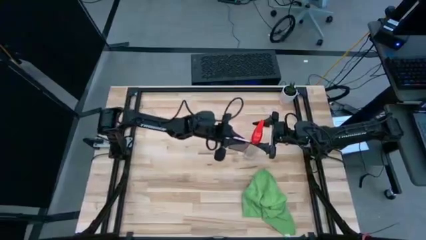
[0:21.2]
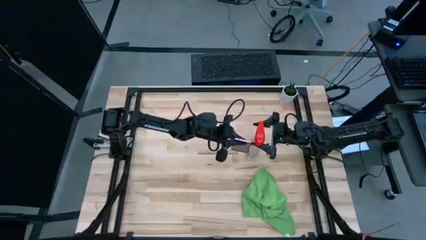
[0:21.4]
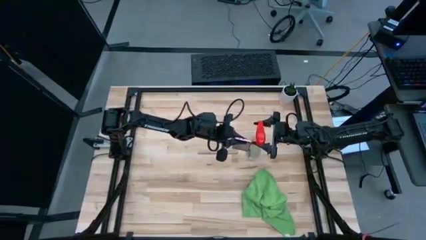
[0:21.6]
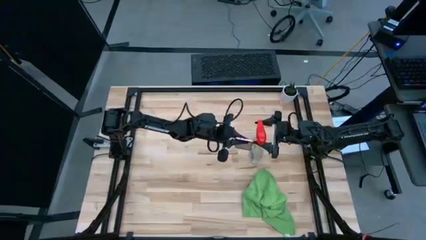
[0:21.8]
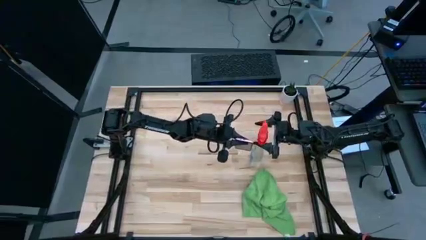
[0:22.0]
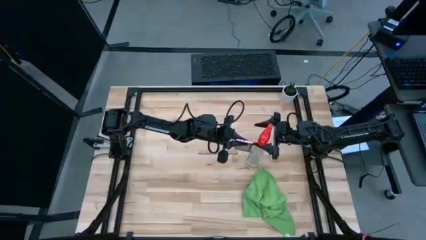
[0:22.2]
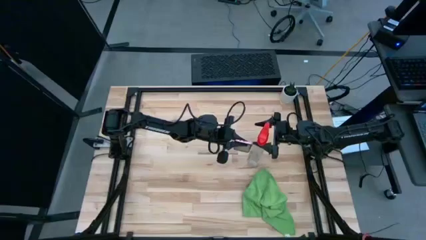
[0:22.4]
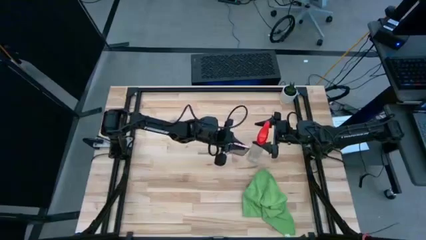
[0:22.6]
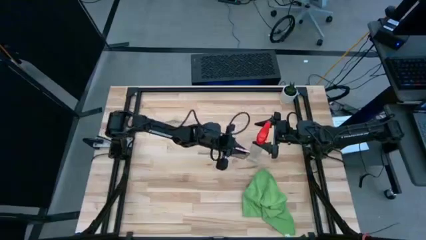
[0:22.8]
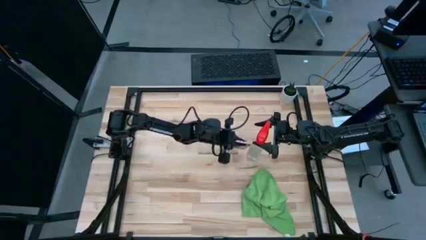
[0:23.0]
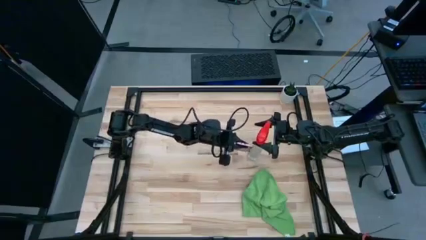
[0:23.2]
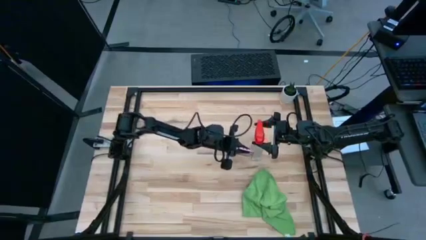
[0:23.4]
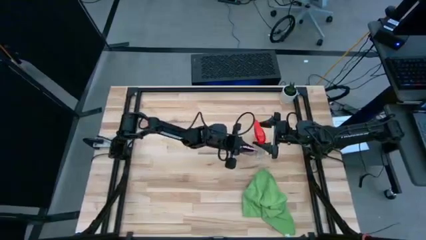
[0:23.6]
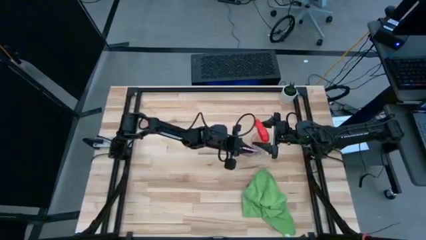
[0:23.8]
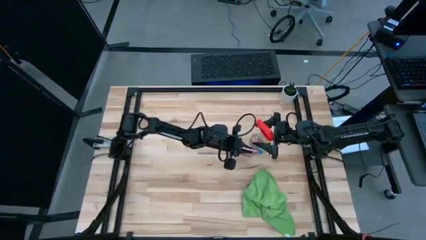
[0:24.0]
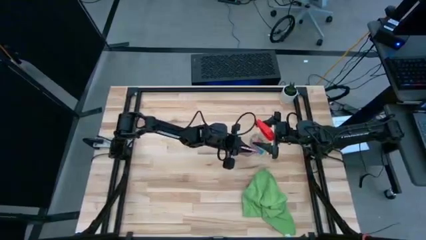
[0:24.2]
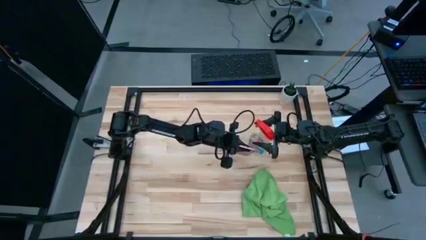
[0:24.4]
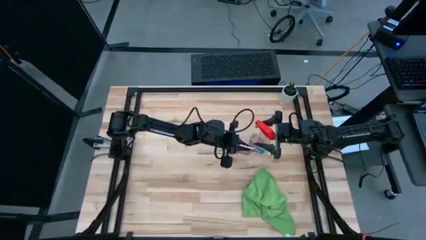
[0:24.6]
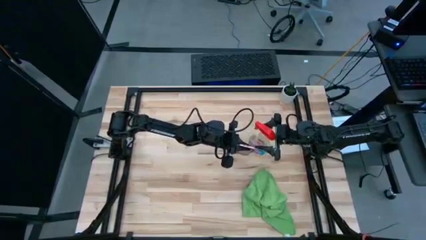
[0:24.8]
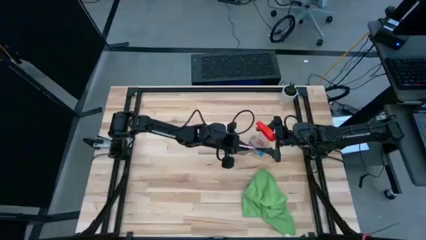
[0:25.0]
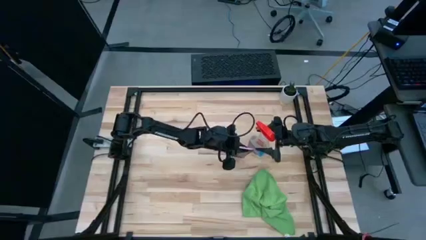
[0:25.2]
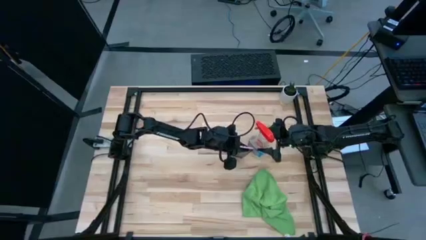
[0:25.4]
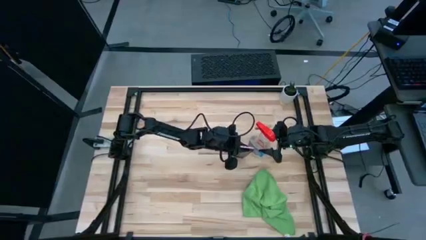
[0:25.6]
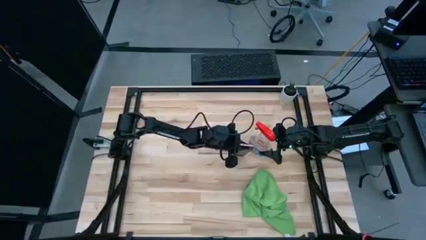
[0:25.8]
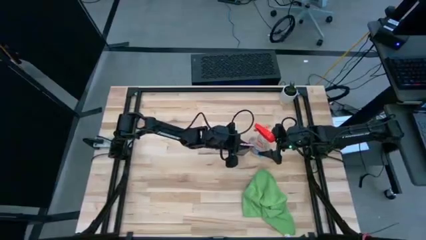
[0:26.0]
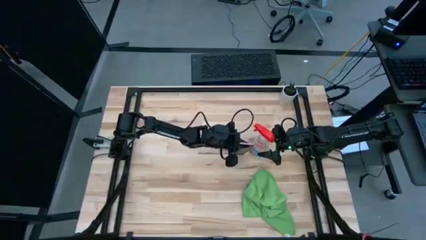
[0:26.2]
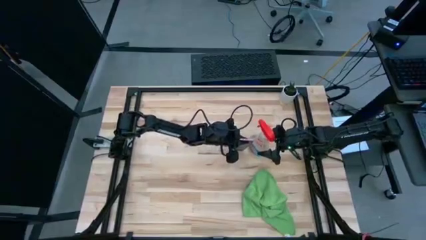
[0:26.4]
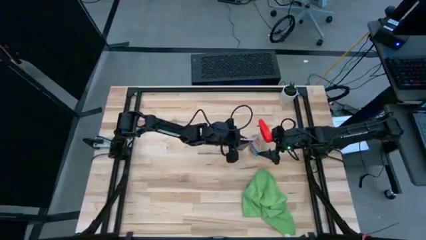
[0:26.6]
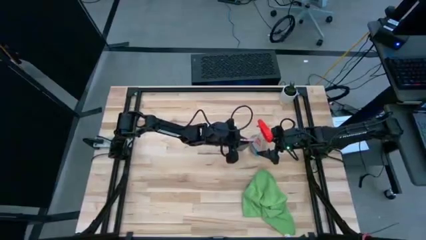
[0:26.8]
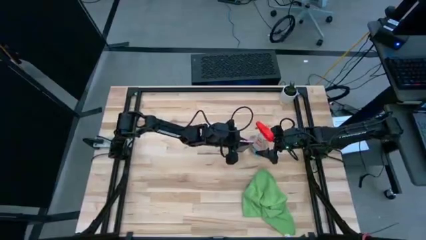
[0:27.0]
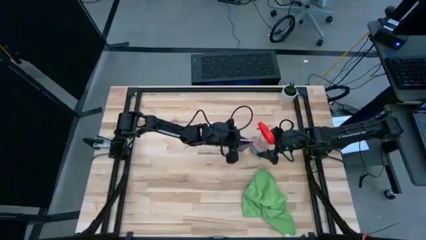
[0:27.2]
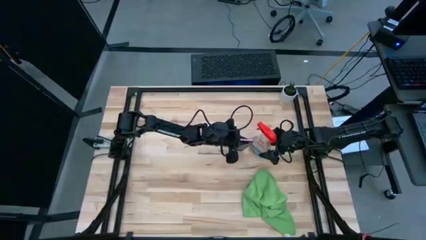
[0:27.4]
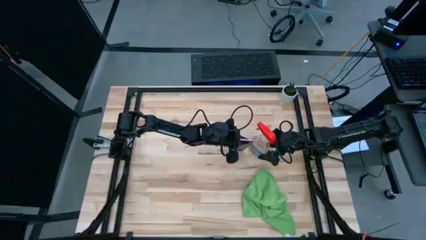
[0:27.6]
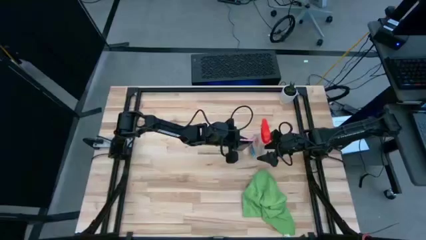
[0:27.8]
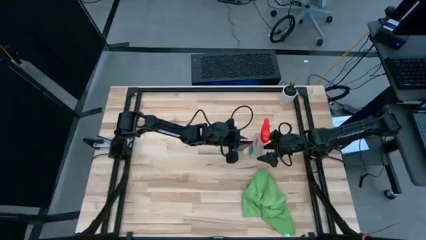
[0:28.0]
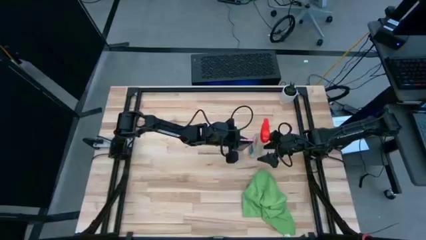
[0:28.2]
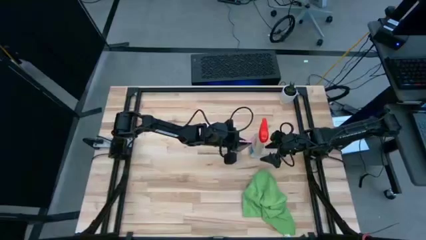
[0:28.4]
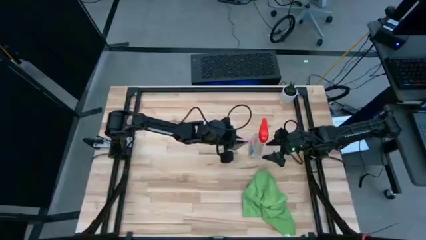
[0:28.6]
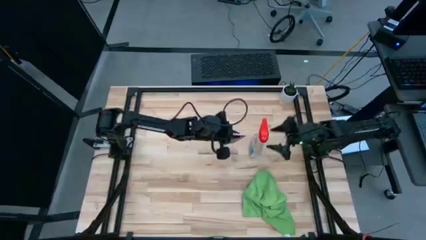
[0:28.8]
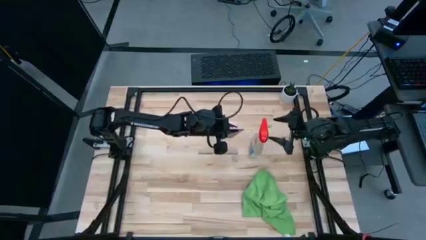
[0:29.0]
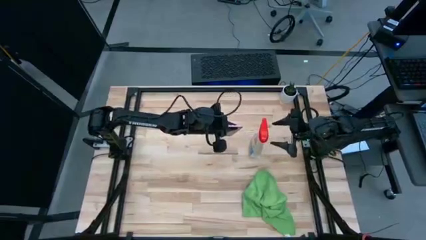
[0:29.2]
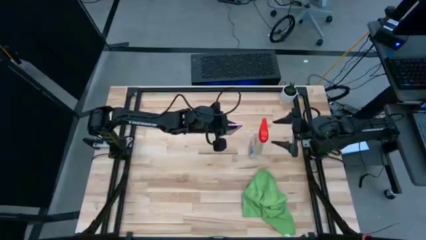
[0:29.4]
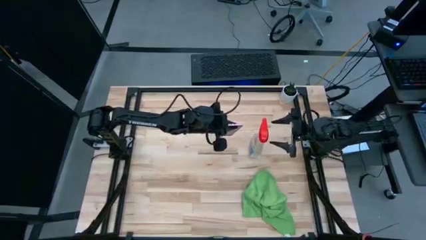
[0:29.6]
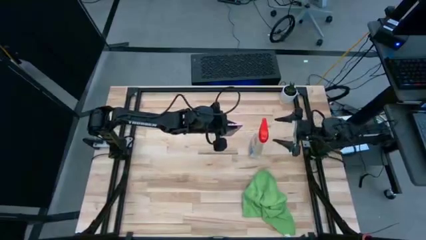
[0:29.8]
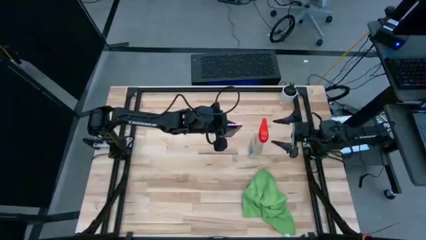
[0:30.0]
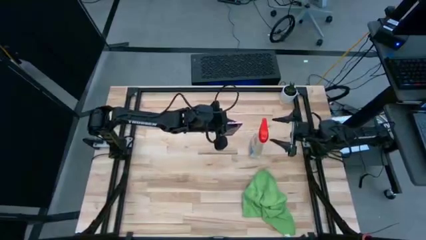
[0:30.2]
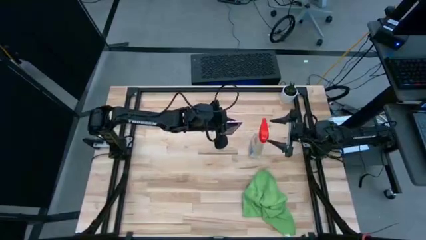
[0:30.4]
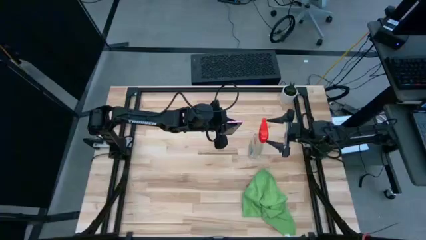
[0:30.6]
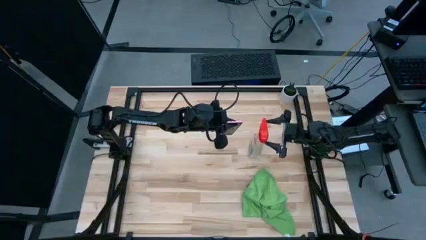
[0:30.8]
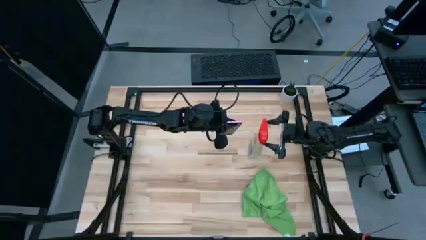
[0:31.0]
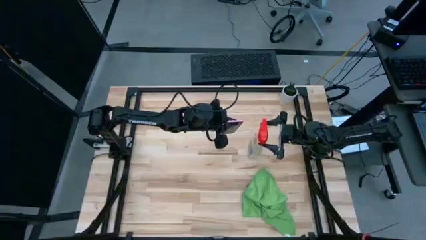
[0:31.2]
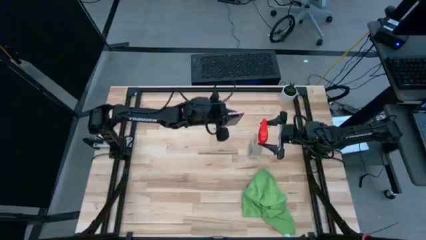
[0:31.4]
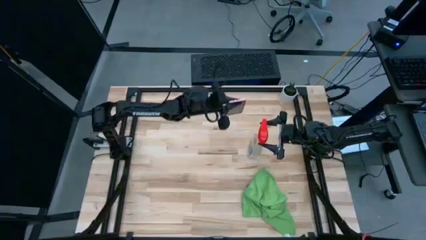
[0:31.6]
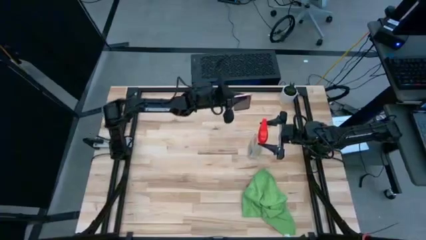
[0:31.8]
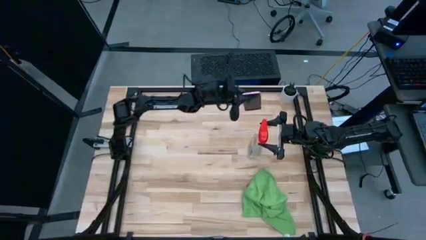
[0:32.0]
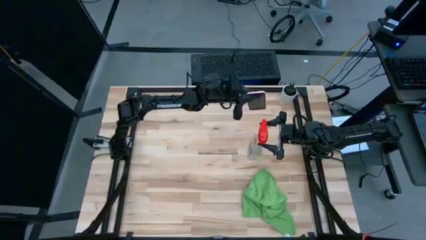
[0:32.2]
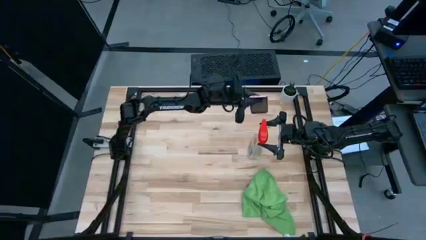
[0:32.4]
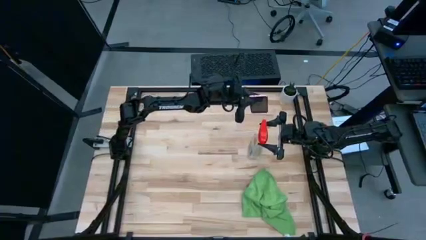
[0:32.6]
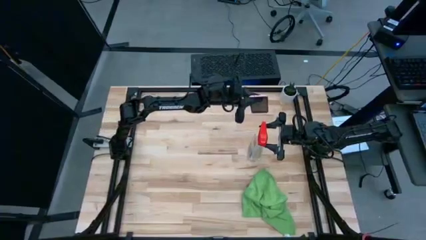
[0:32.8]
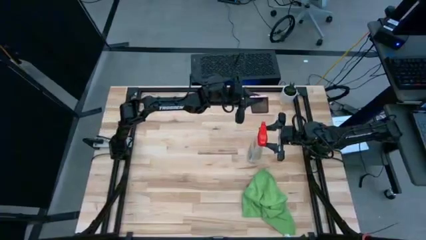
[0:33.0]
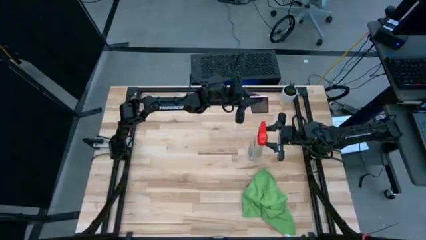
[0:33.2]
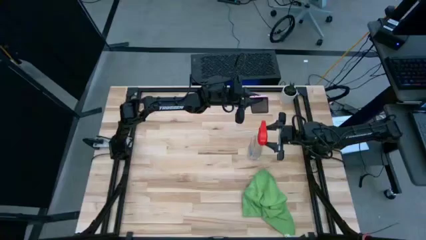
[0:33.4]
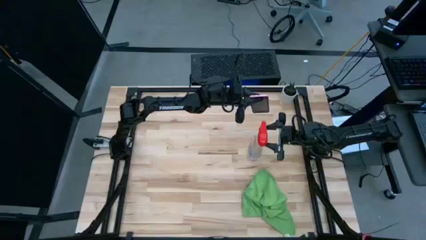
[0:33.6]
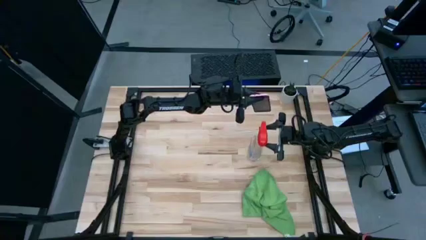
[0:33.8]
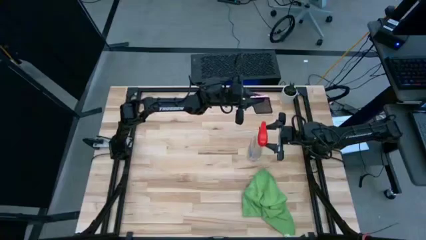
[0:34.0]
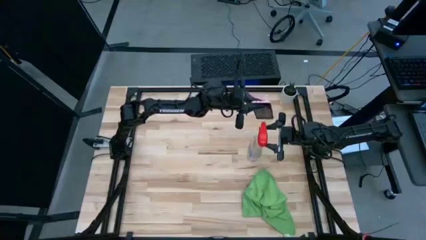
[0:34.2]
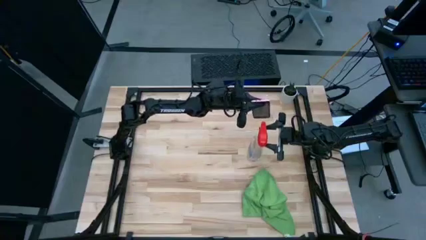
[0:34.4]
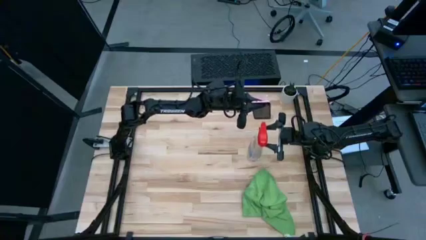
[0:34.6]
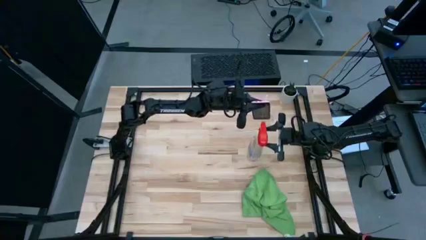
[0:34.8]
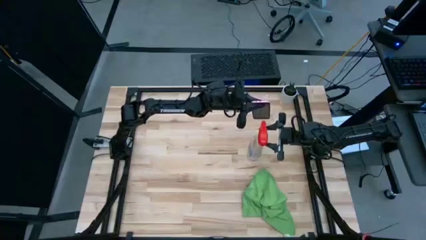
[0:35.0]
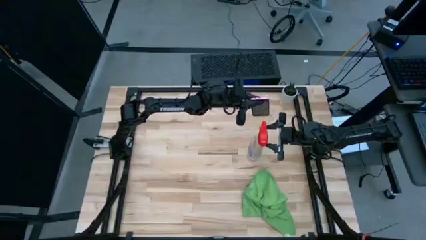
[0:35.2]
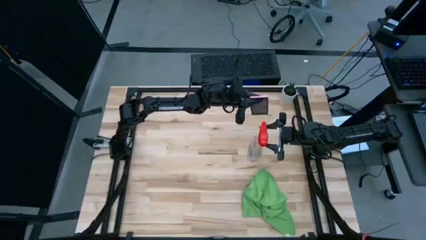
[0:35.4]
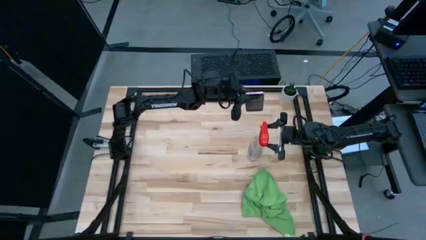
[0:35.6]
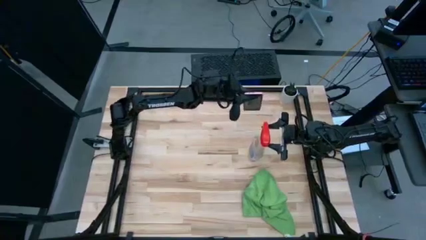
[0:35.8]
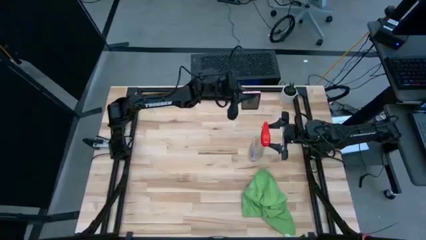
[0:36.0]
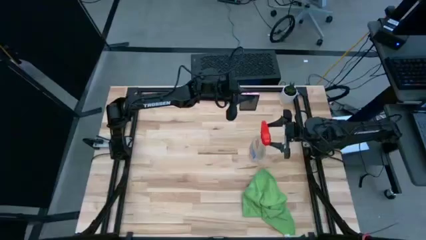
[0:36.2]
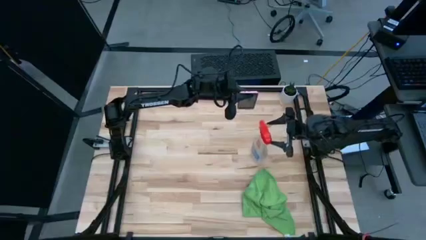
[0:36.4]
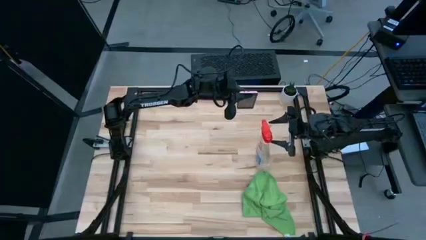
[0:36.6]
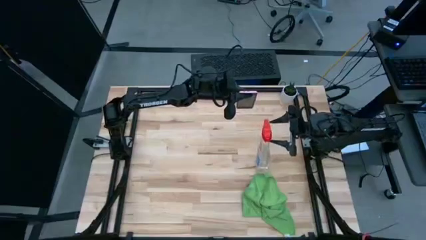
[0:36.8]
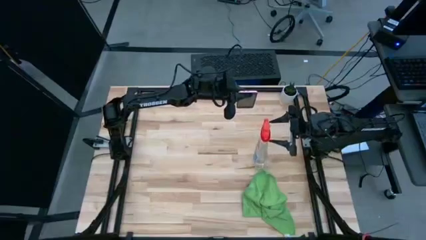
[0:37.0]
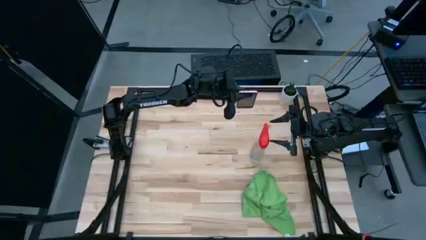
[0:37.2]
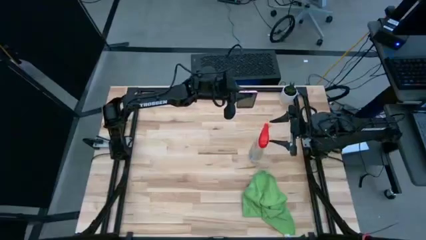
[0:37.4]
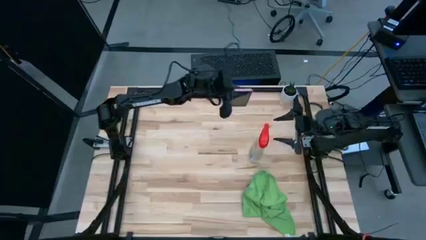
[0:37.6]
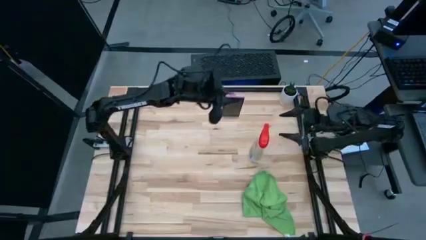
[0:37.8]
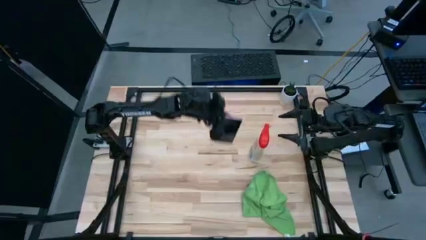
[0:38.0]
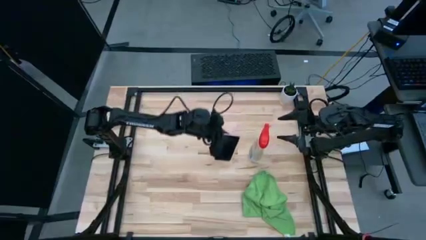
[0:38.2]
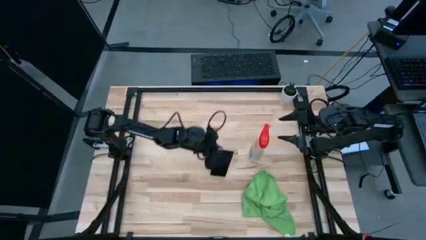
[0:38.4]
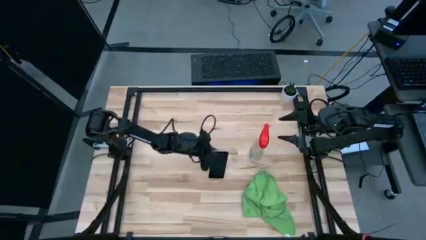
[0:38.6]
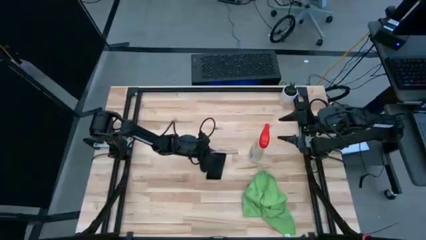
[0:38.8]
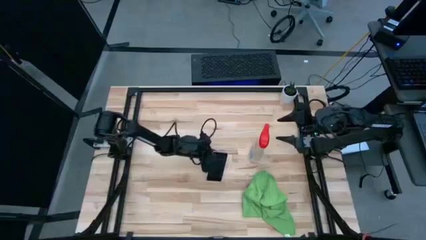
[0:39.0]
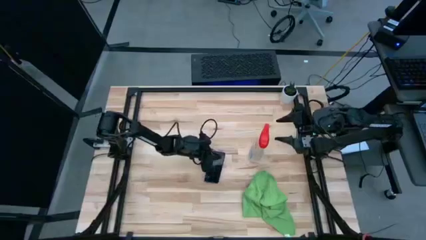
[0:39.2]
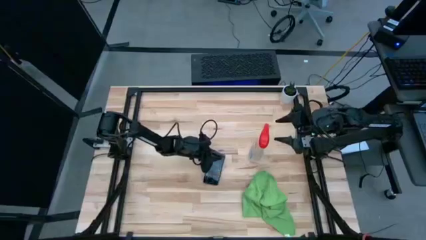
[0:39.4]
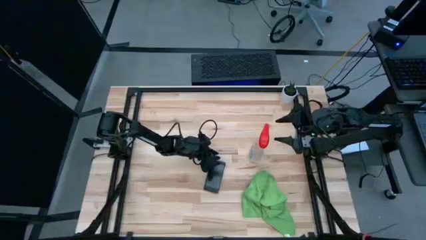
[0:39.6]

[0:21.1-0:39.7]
Task: Apply microfiber cloth
Spray the front of the cellphone with the cleaning bottle
